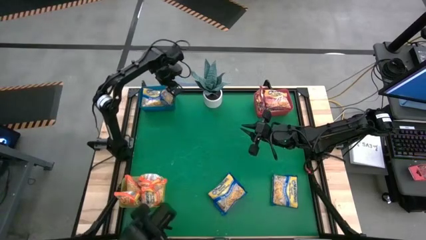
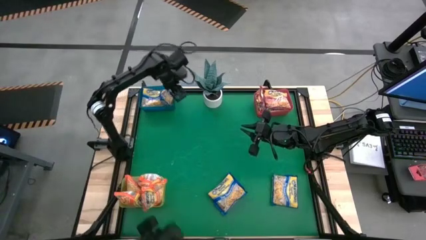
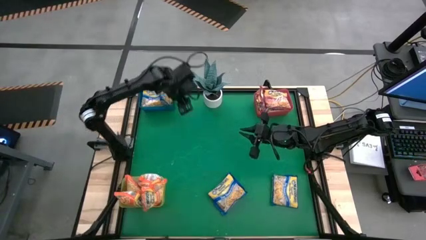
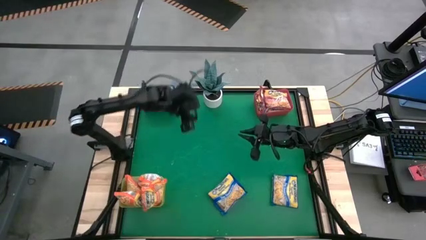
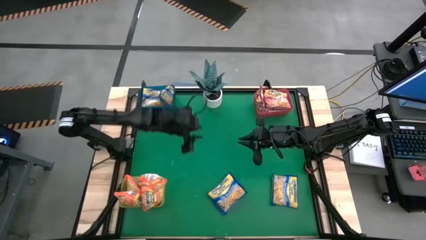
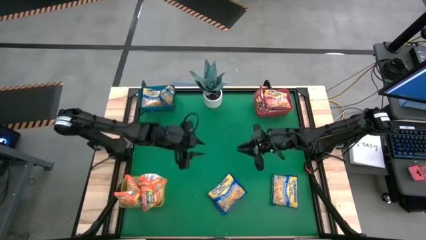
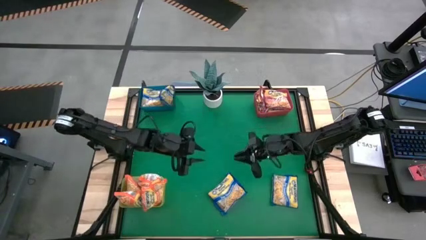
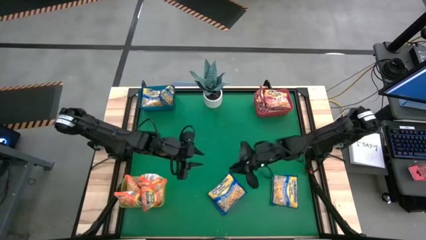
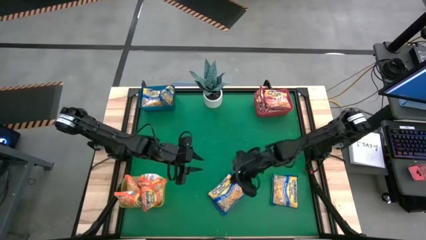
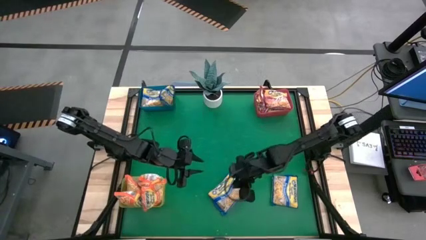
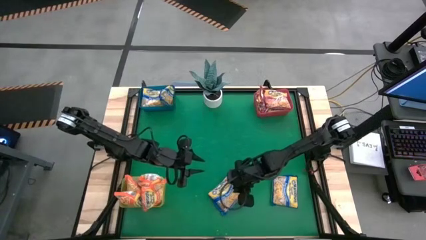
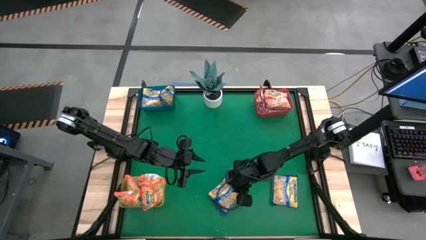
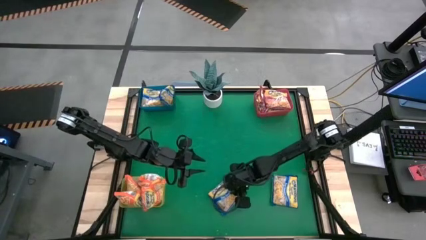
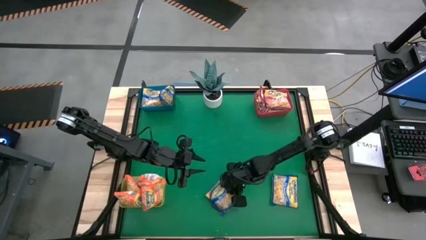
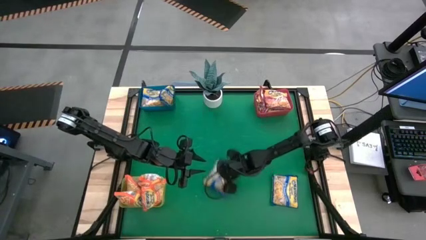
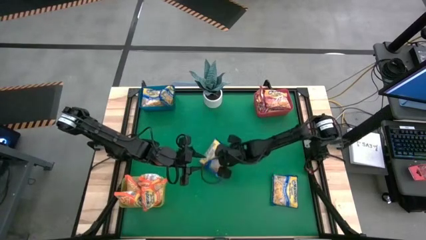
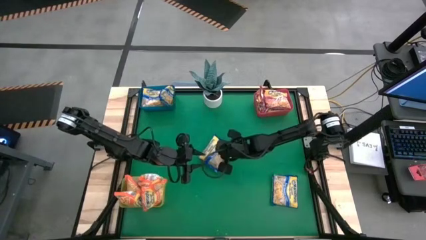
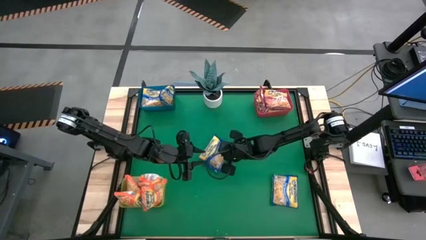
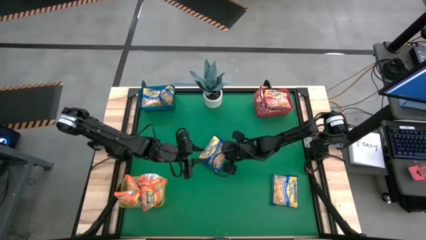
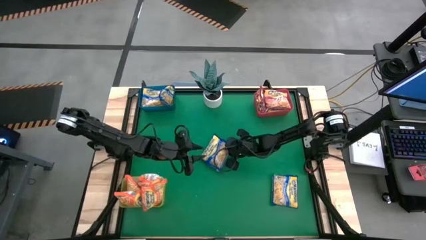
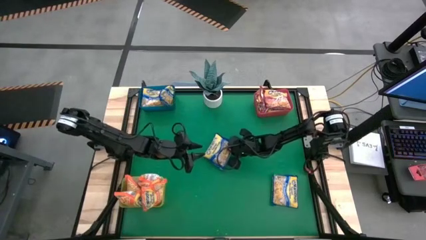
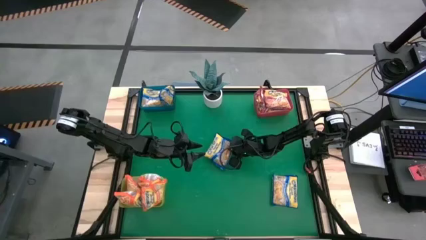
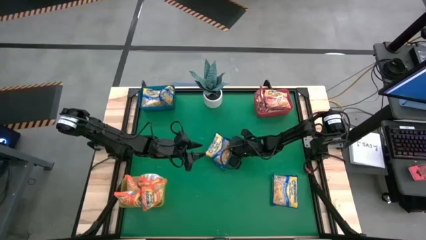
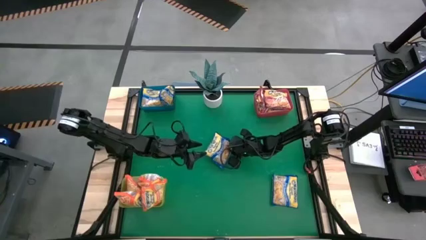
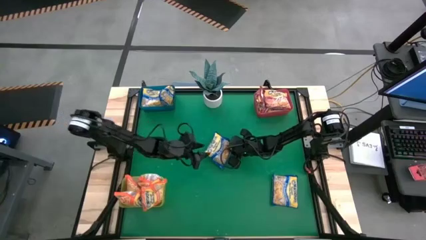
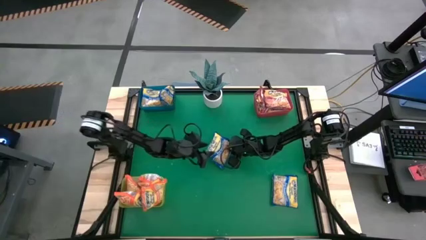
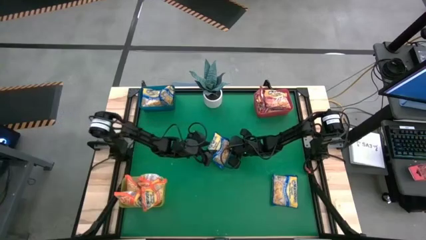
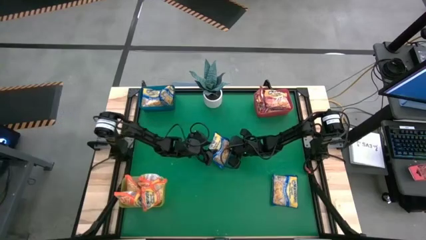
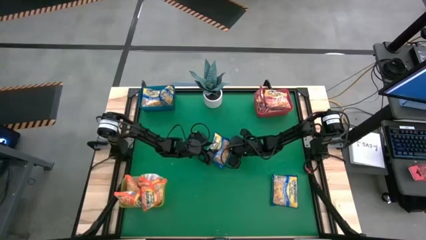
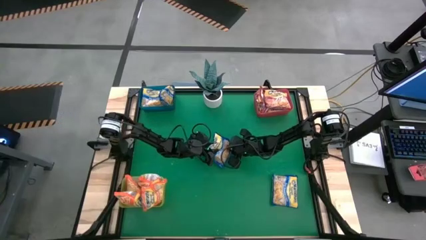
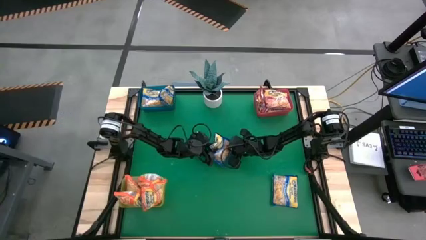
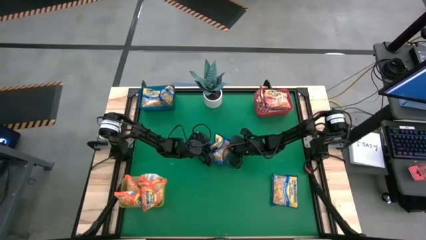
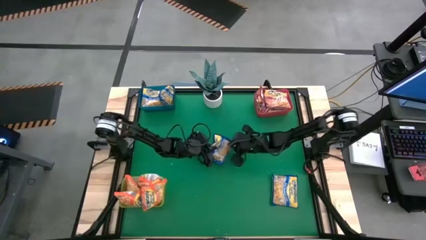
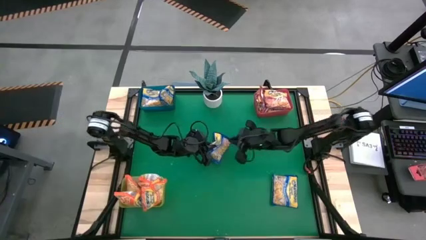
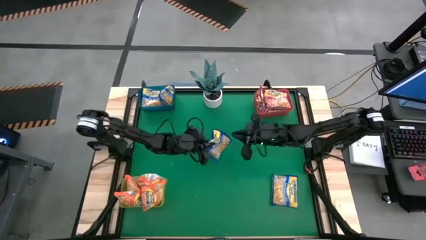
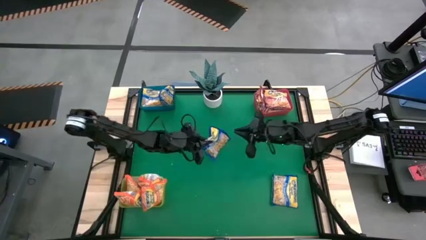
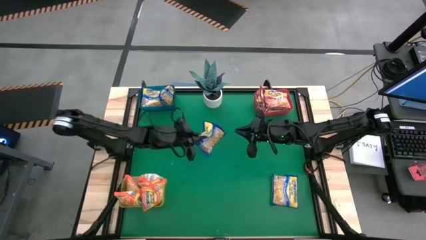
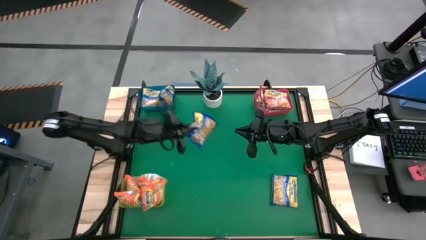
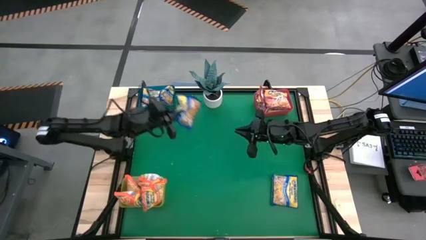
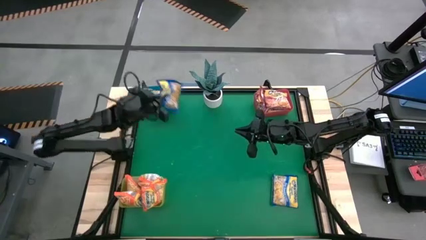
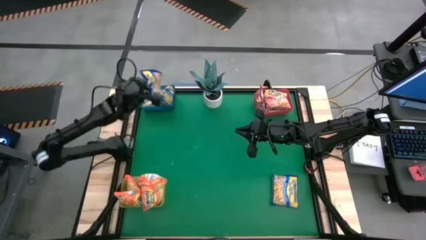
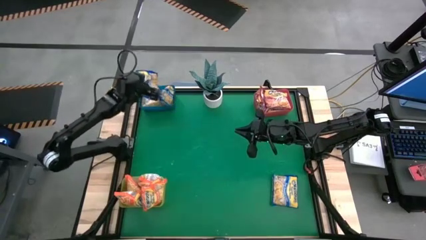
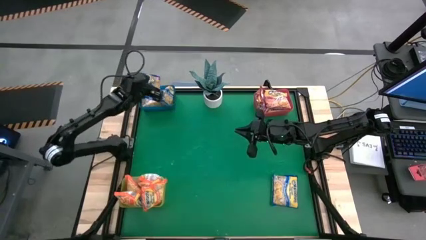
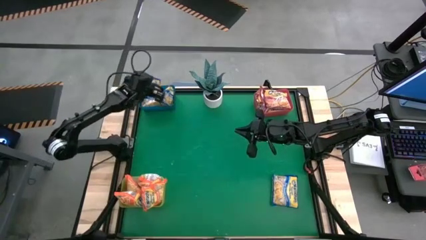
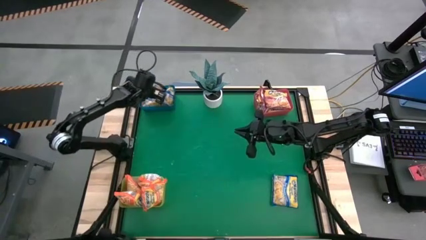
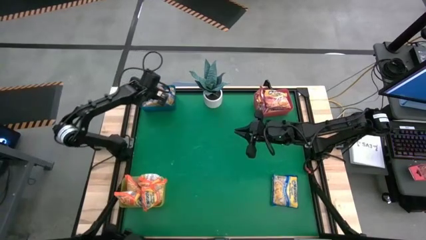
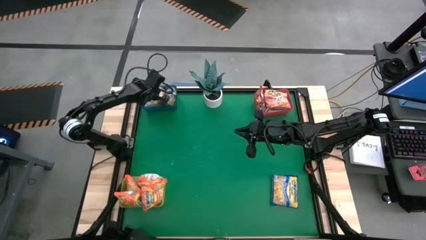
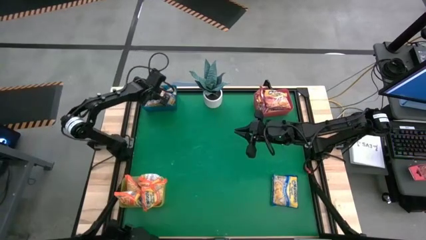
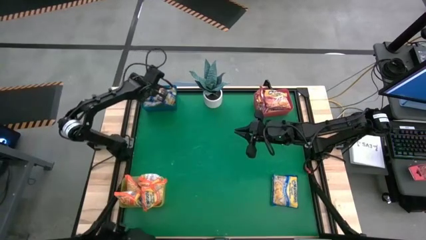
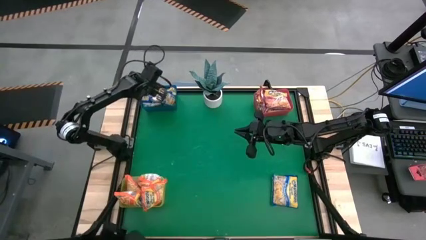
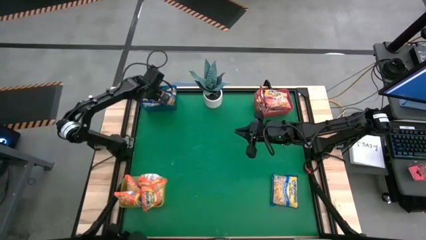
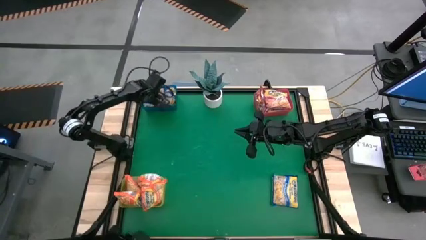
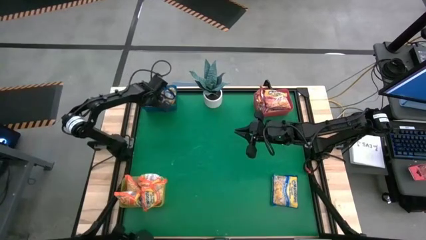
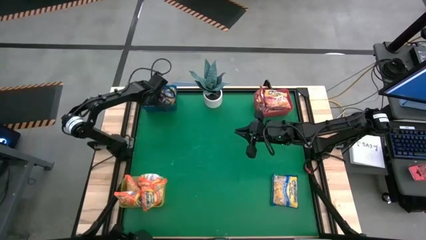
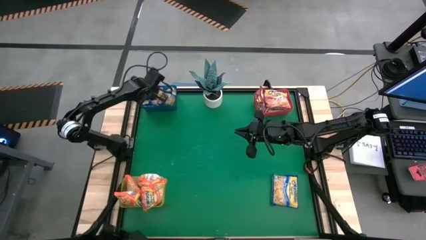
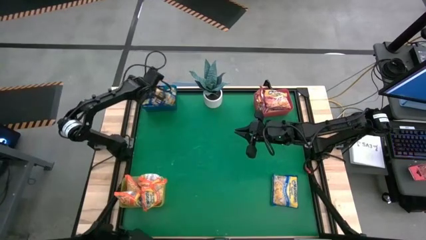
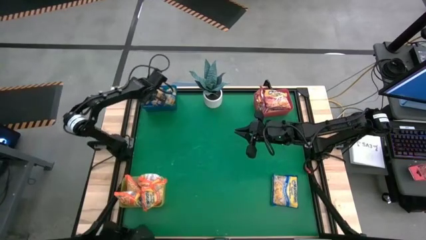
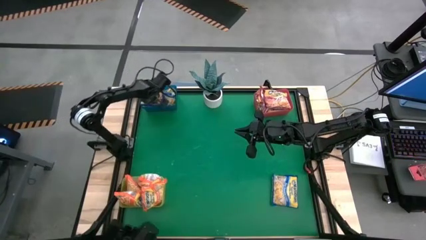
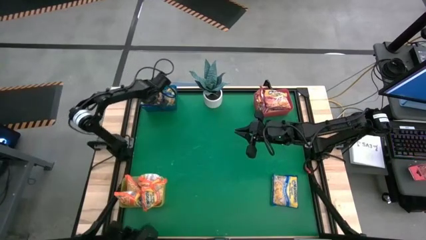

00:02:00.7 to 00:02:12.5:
Task: Sort Maruchan noodles
Put the blue noodle pack into the blue bin
